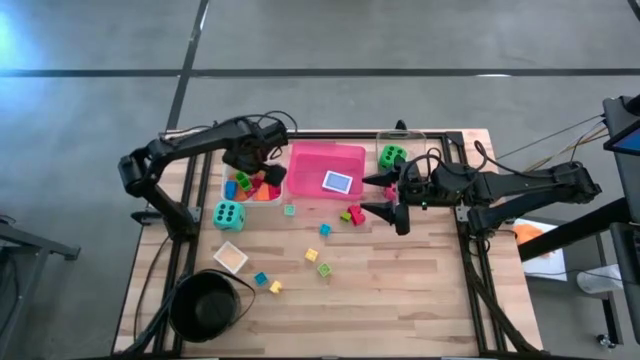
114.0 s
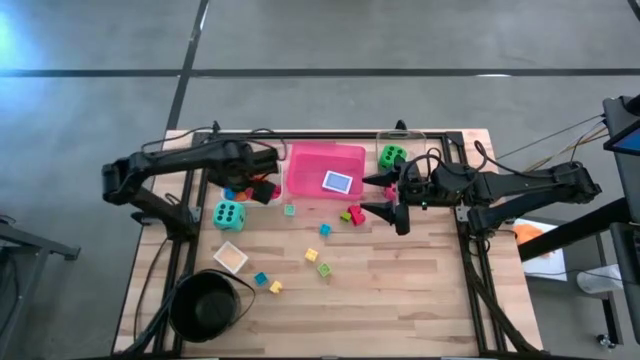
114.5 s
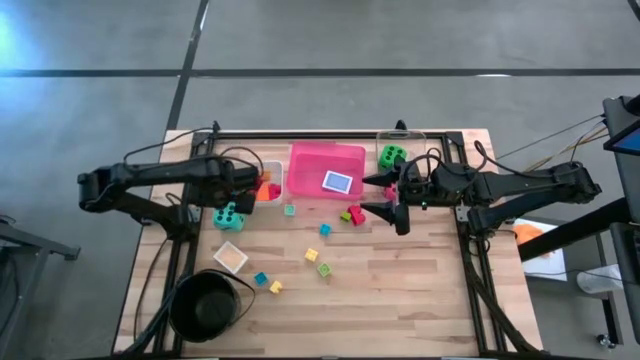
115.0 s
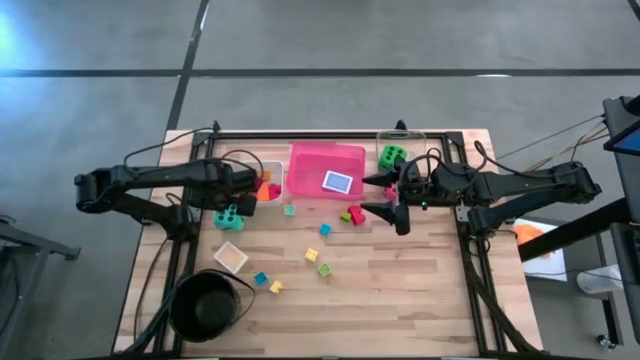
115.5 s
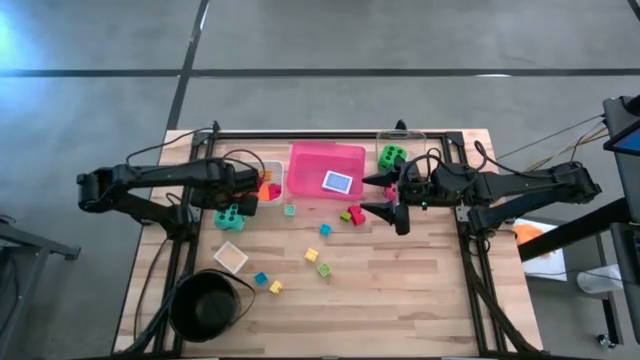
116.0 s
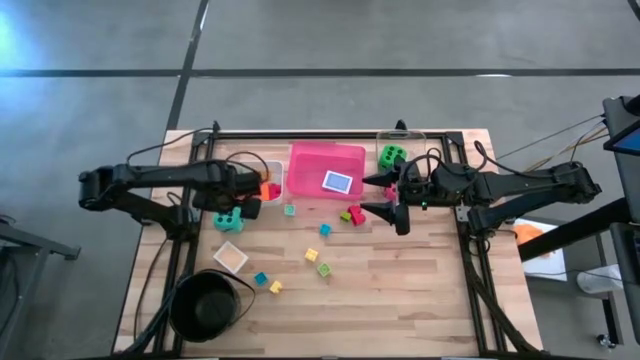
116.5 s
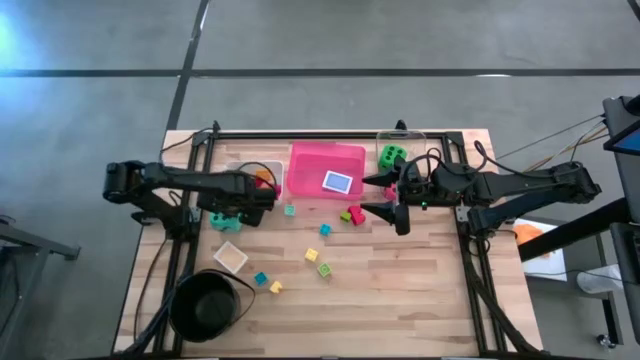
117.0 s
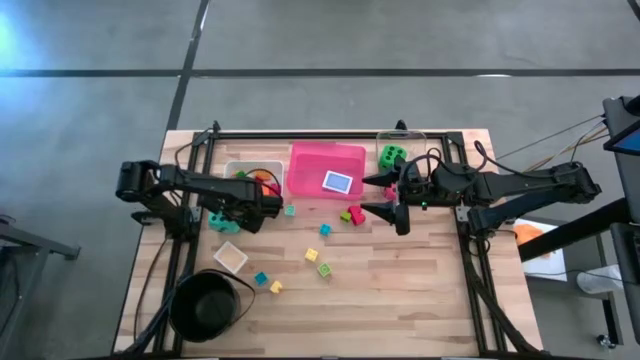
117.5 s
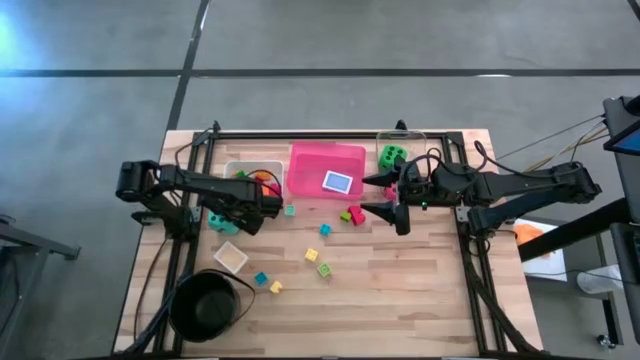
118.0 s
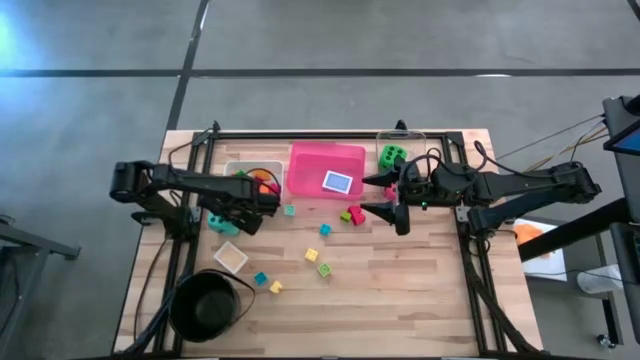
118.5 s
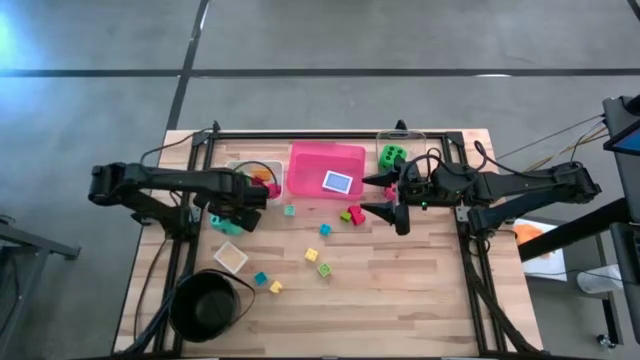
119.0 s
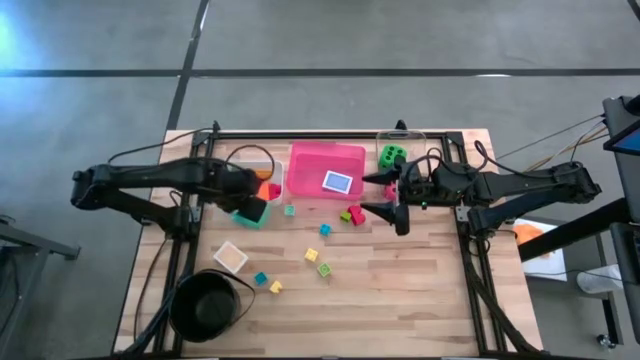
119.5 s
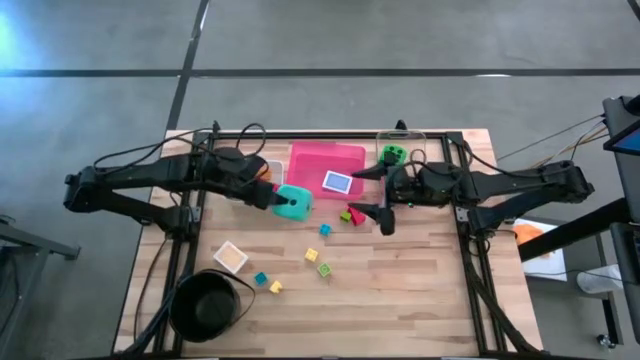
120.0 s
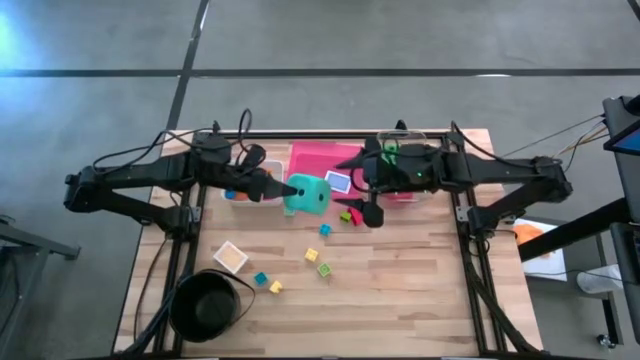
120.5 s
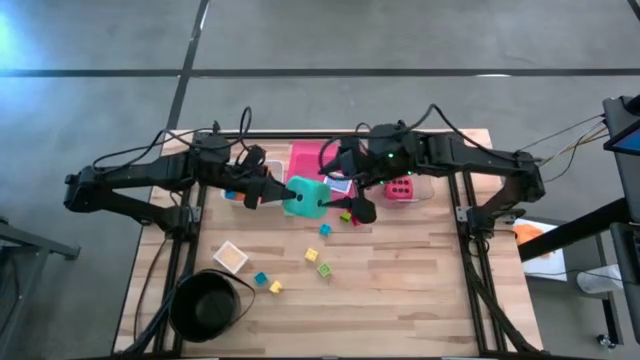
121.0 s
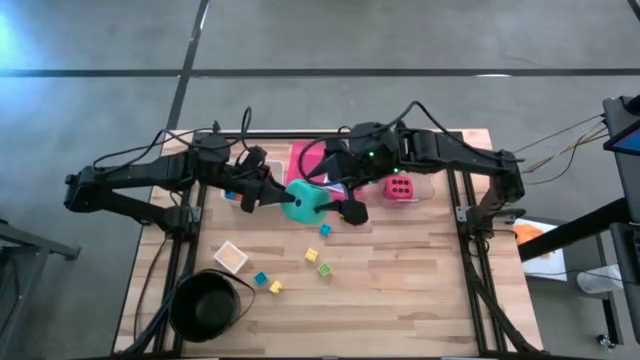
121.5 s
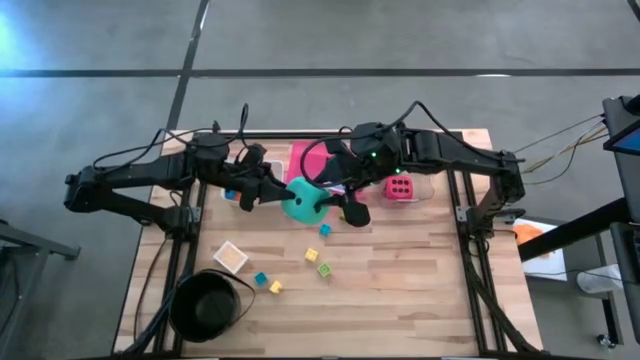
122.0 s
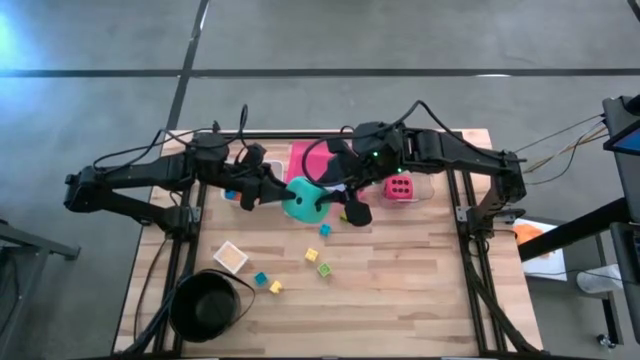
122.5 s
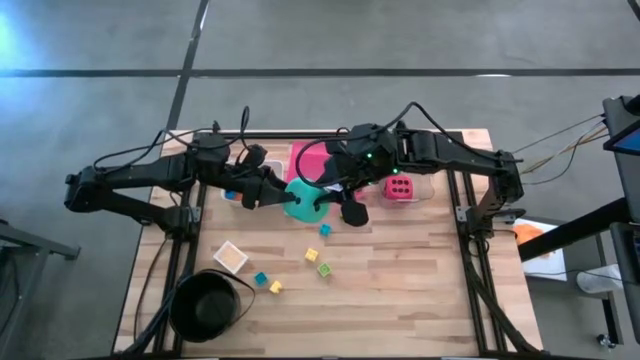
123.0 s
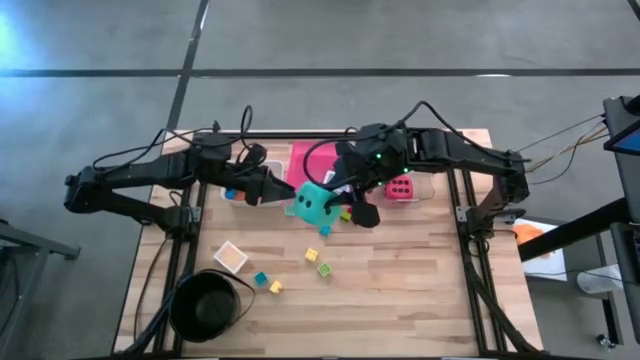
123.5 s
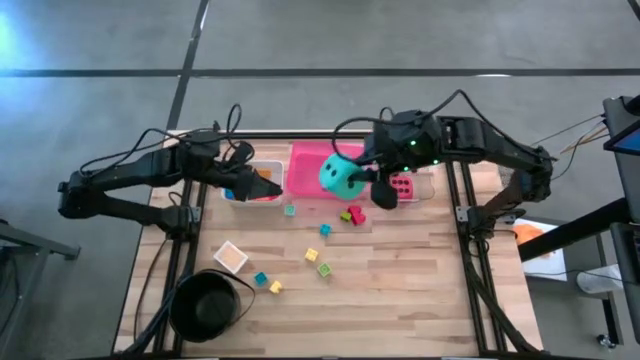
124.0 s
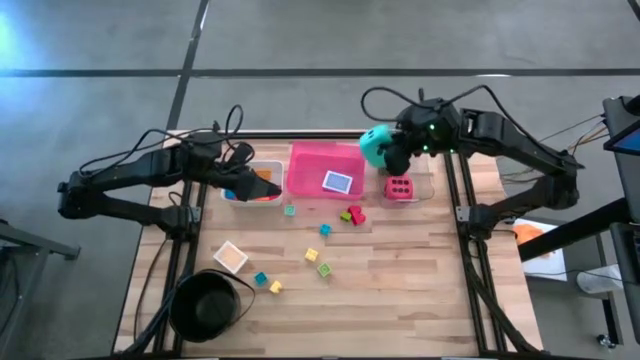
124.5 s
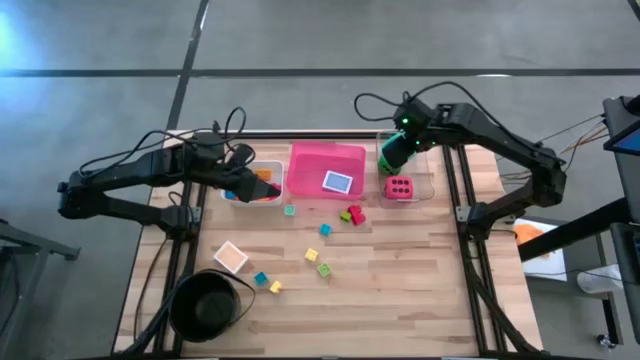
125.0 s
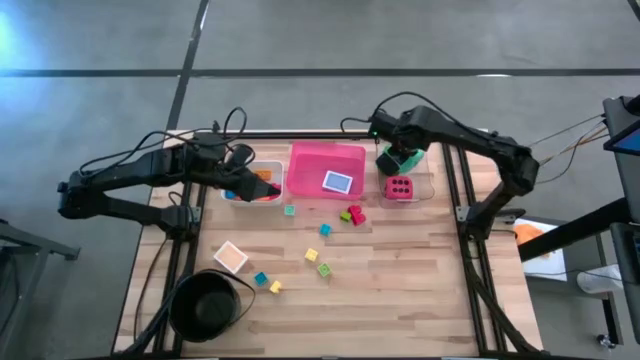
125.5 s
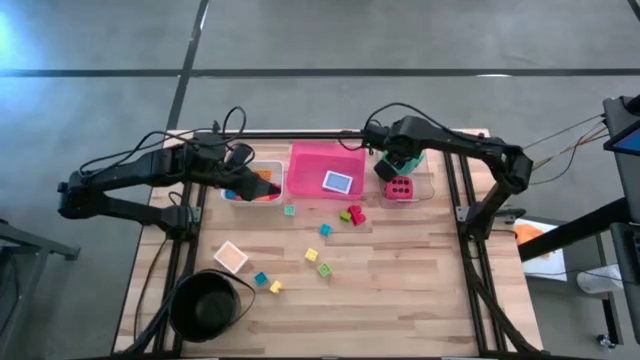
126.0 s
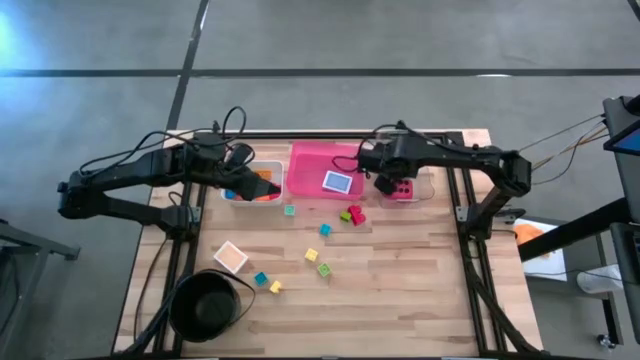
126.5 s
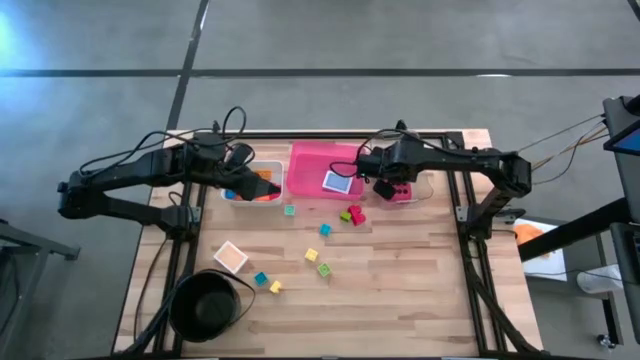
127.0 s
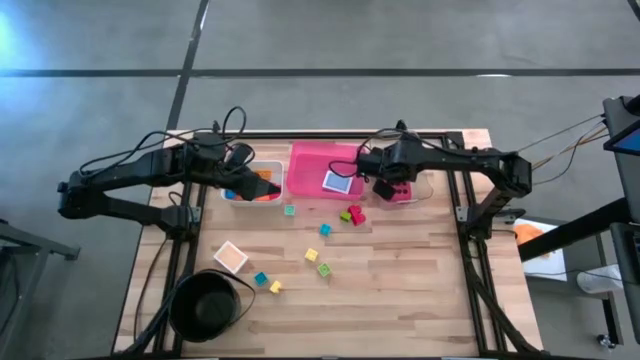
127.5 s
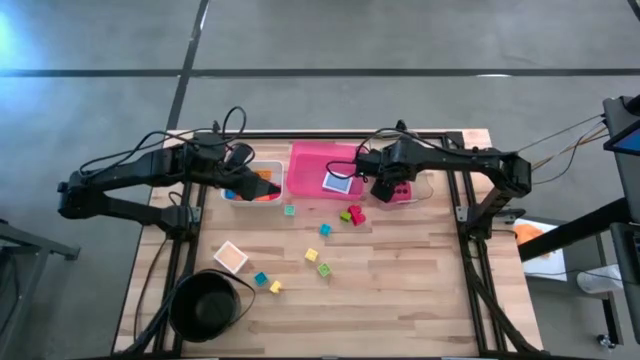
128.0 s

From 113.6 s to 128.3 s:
Task: Pick & Place Toys
Put the blue dice into the transparent bin bin

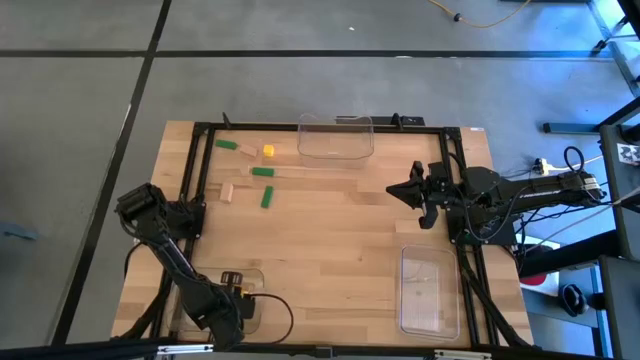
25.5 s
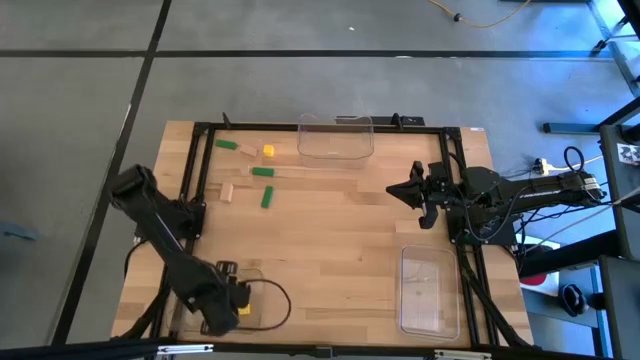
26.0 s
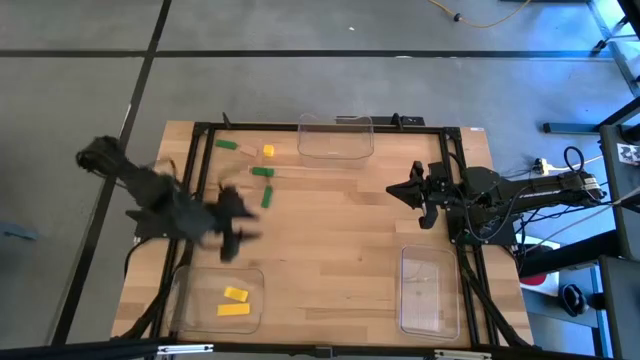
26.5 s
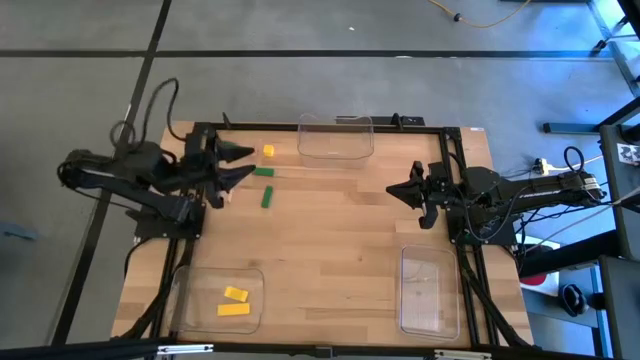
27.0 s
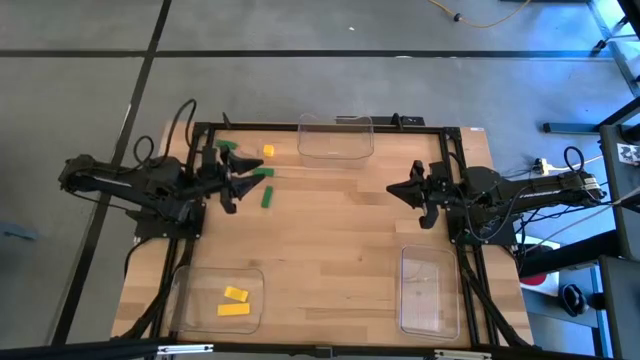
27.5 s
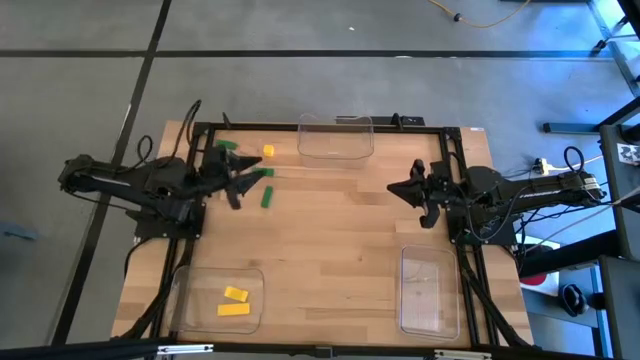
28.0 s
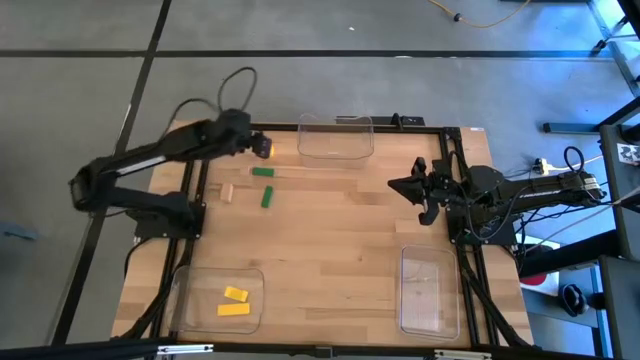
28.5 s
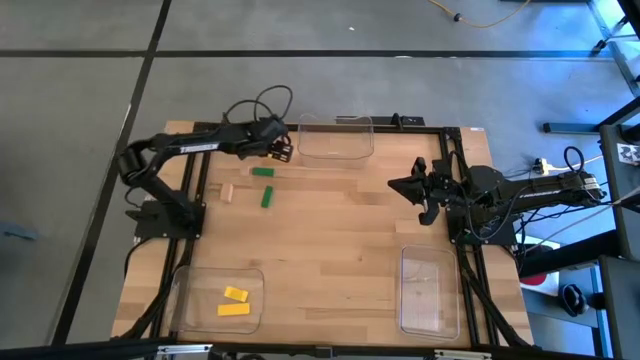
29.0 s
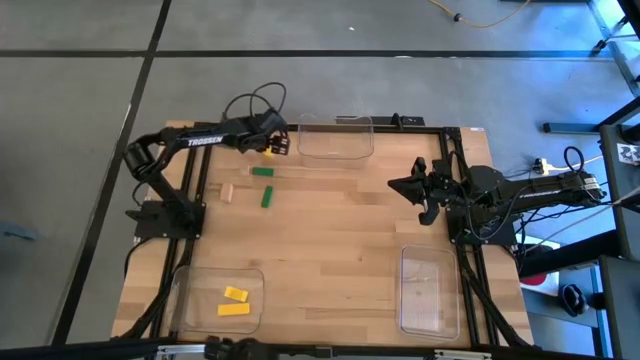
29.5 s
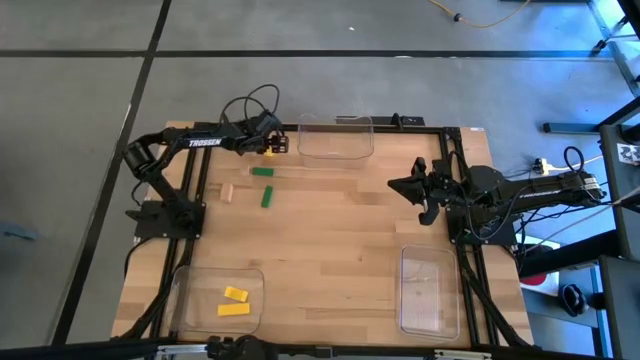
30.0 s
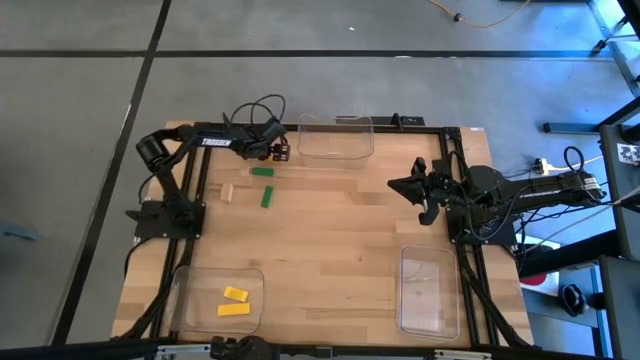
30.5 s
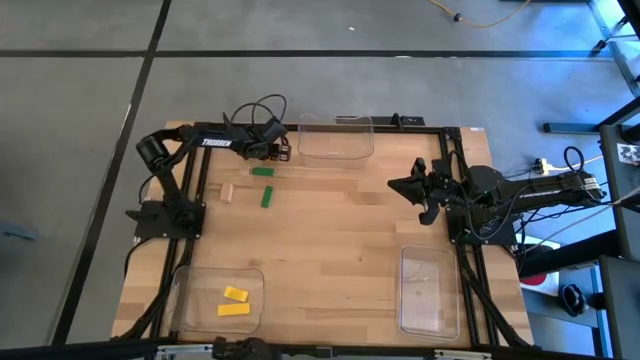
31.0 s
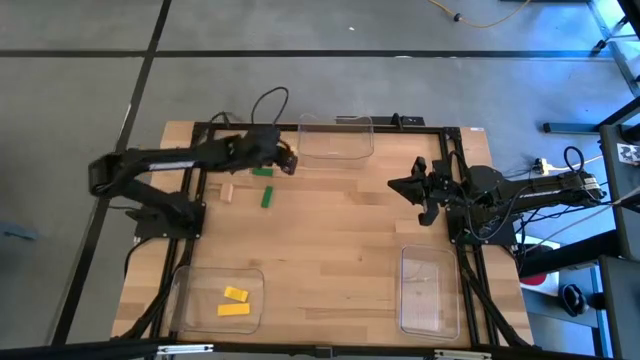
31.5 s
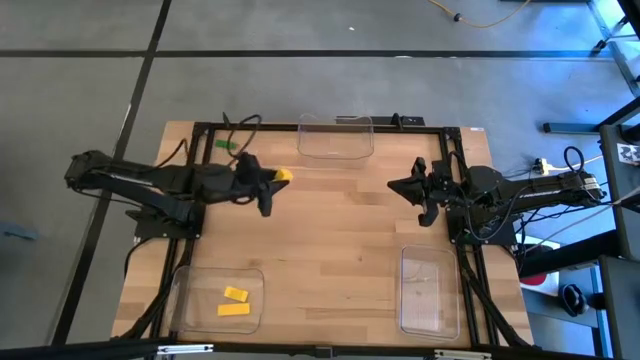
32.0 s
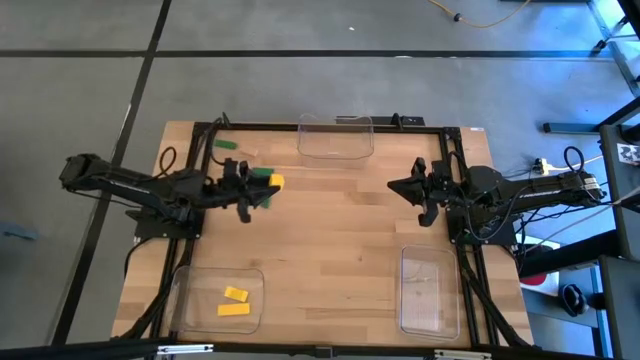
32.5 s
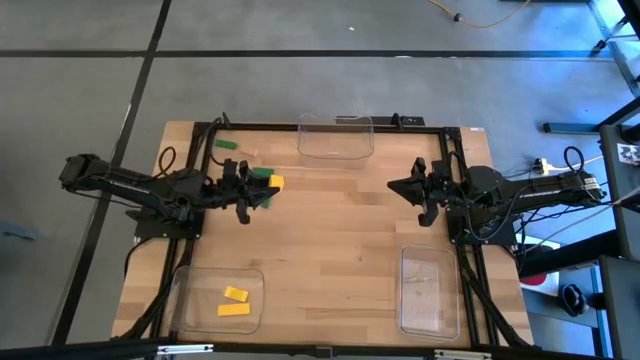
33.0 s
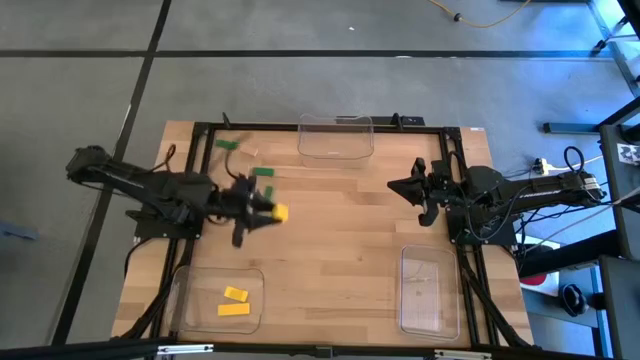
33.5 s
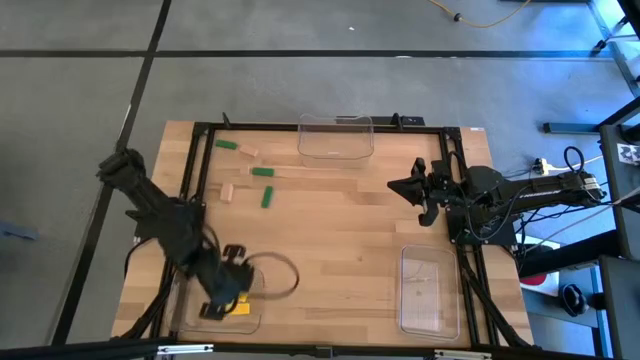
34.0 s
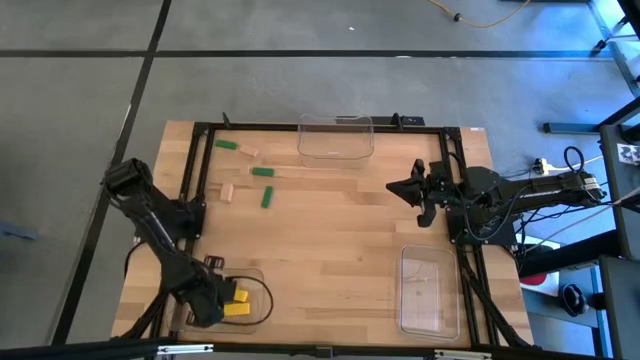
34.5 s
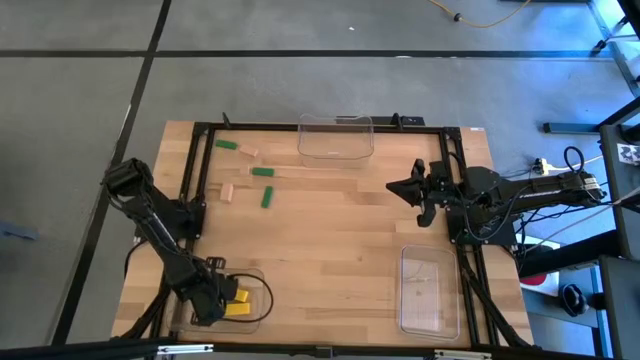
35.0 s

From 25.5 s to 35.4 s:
Task: Sort & place blocks by color
Put the yellow block into the bottom left transparent bin
